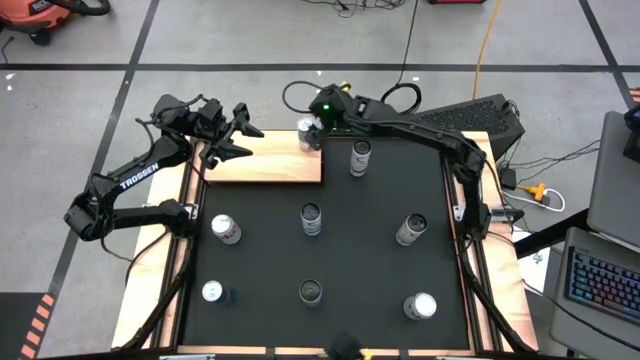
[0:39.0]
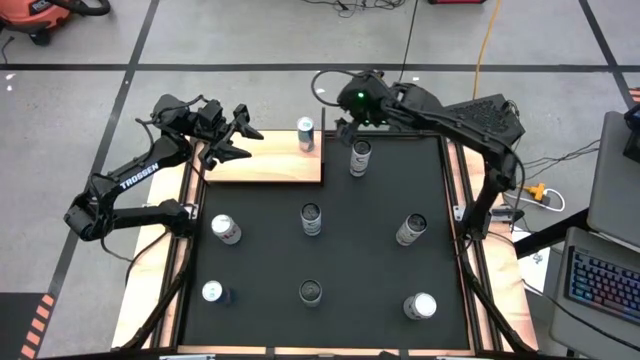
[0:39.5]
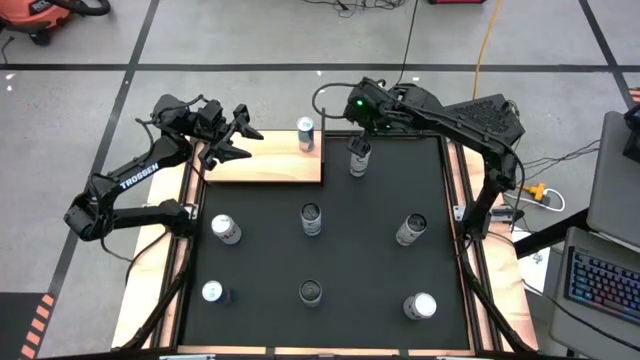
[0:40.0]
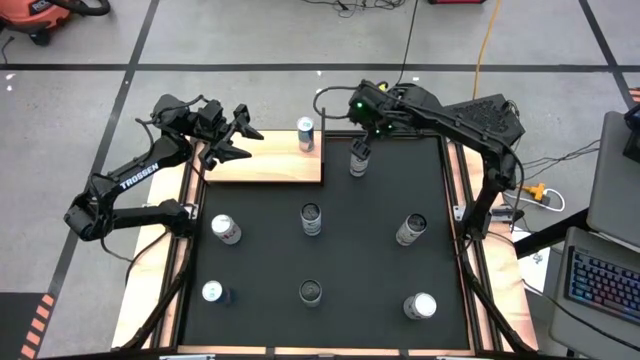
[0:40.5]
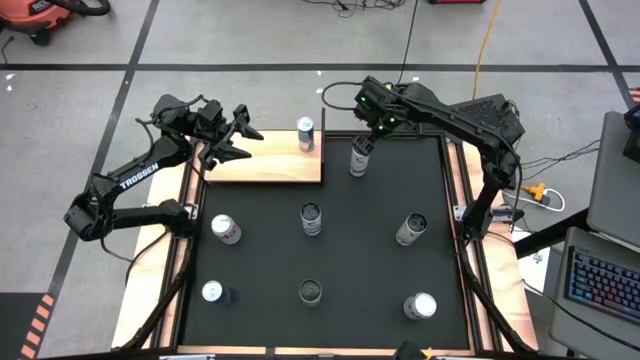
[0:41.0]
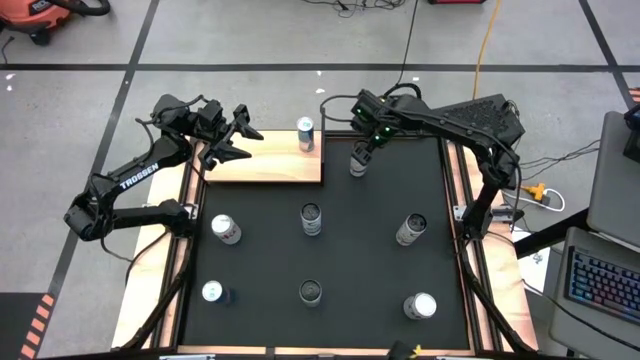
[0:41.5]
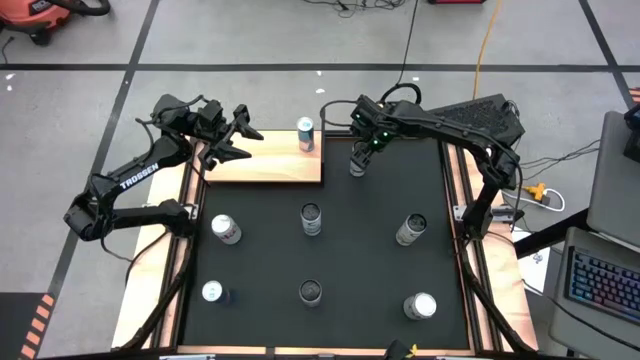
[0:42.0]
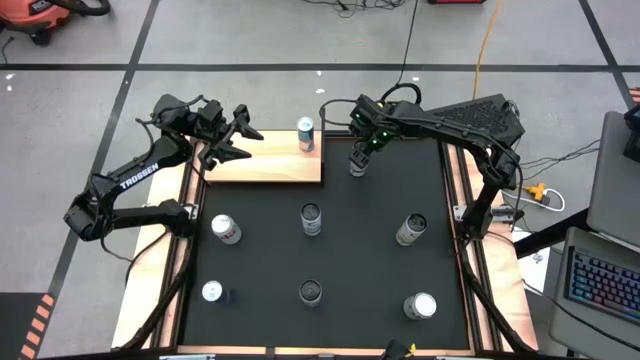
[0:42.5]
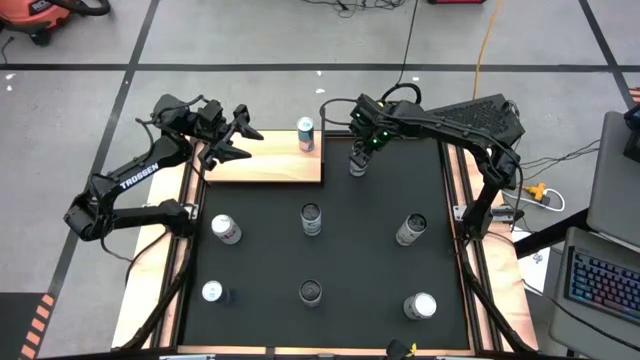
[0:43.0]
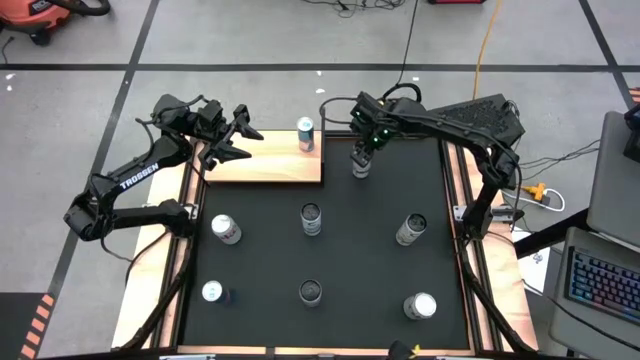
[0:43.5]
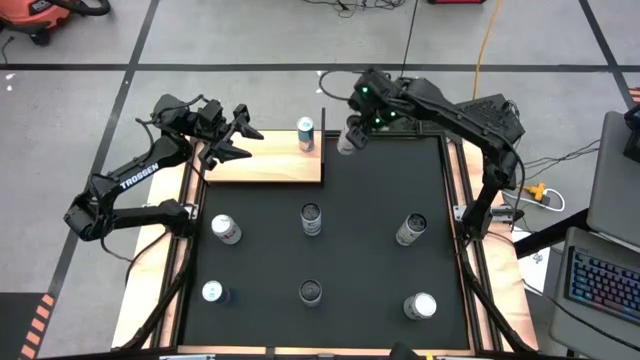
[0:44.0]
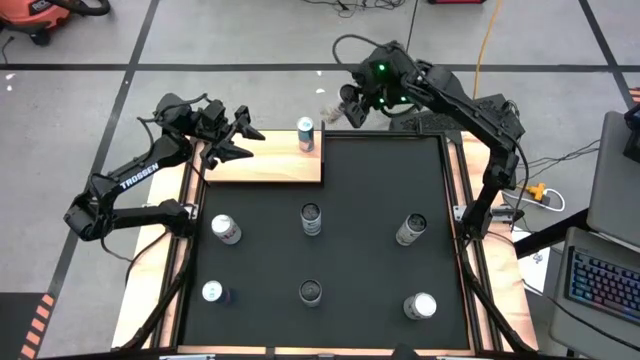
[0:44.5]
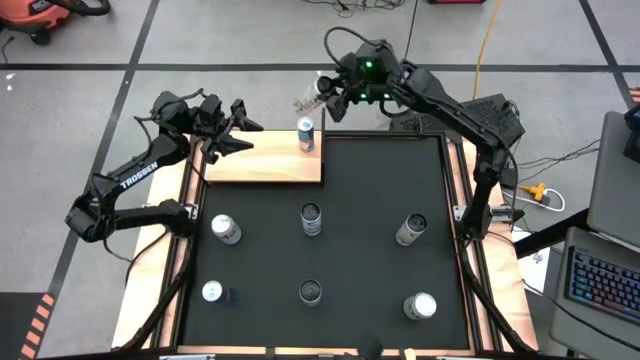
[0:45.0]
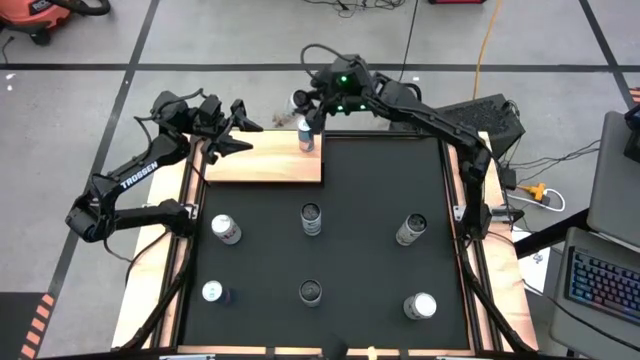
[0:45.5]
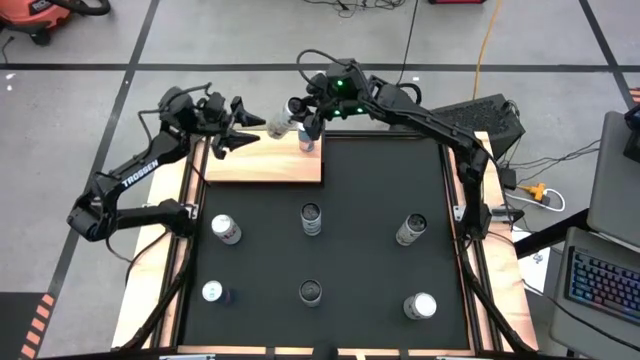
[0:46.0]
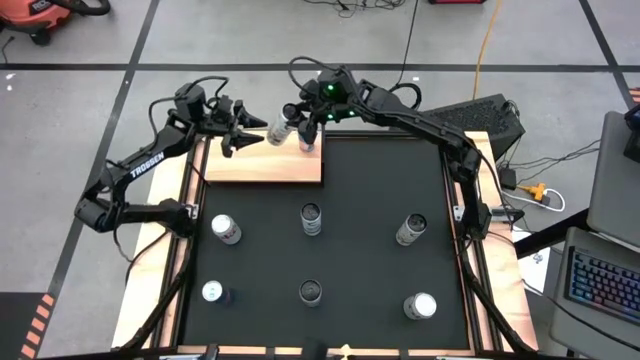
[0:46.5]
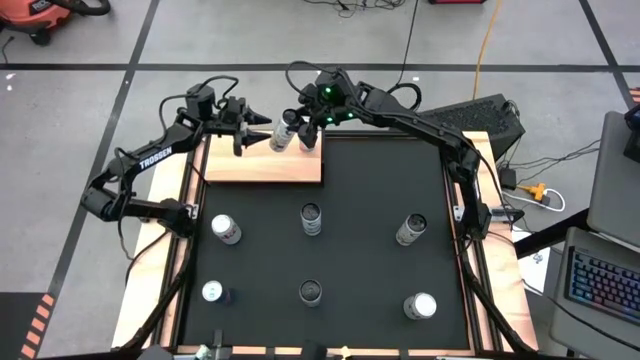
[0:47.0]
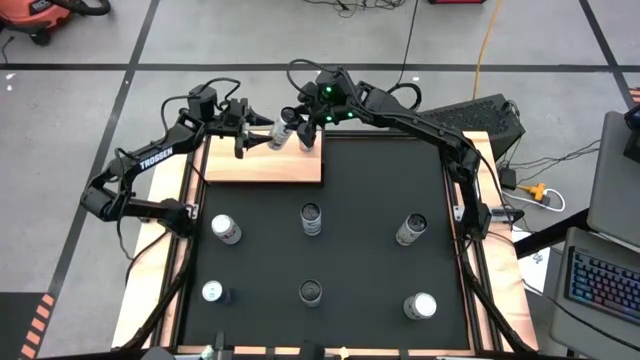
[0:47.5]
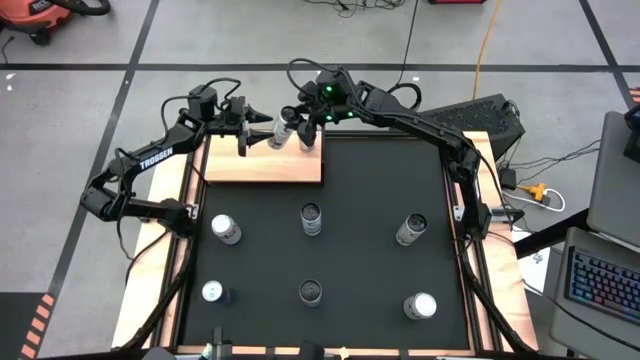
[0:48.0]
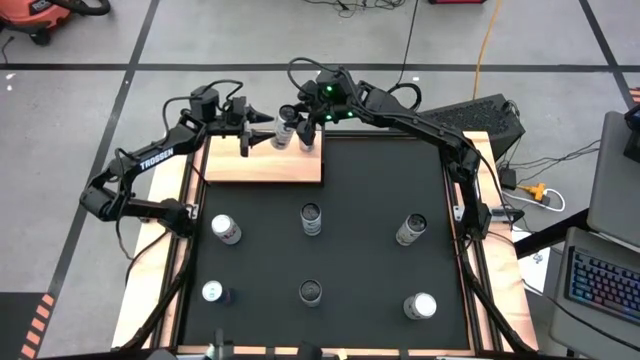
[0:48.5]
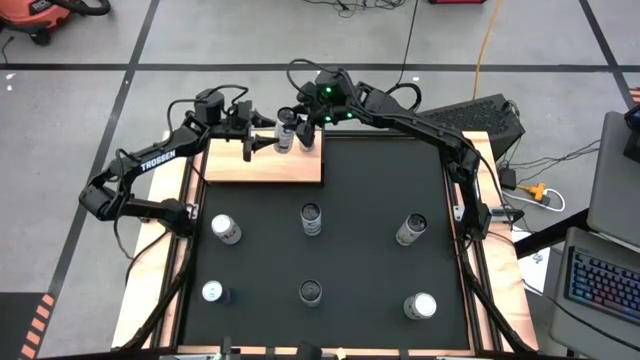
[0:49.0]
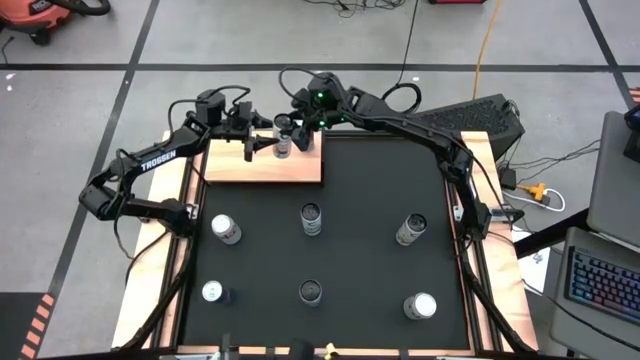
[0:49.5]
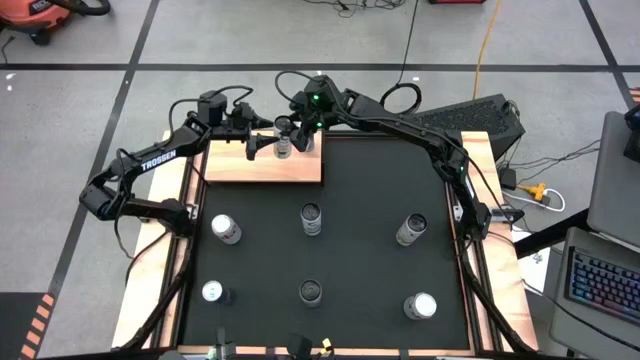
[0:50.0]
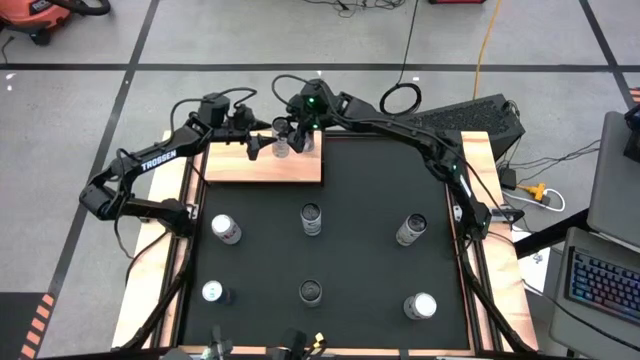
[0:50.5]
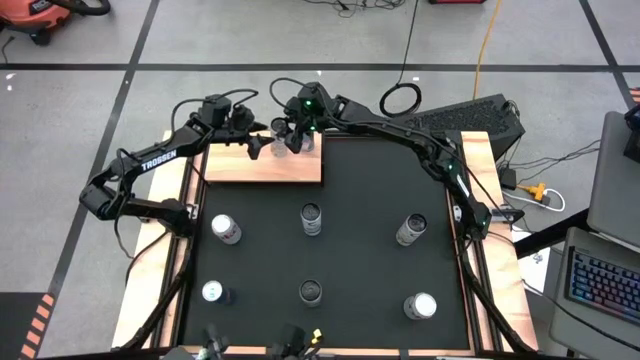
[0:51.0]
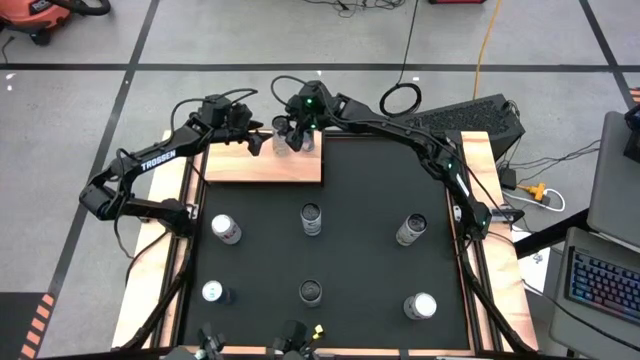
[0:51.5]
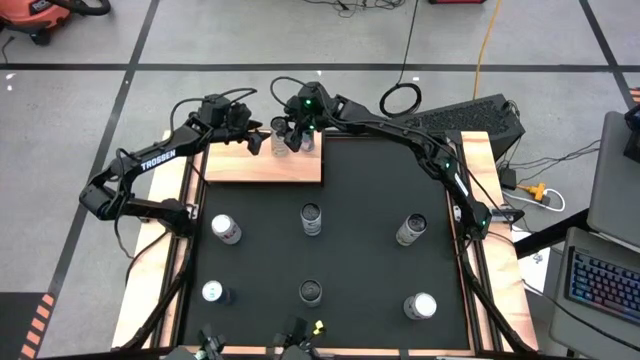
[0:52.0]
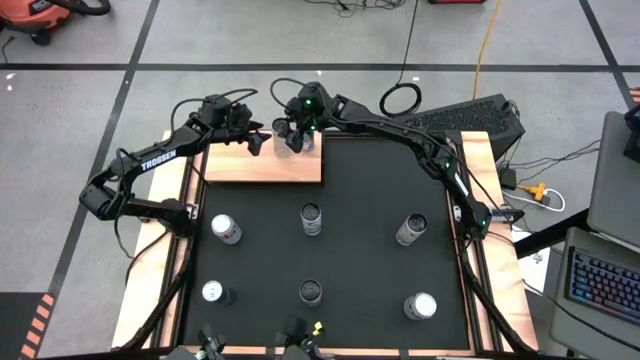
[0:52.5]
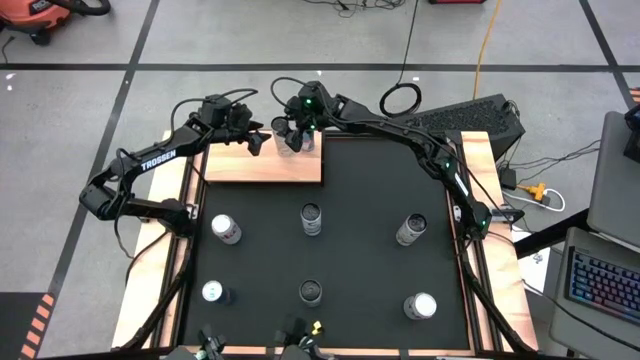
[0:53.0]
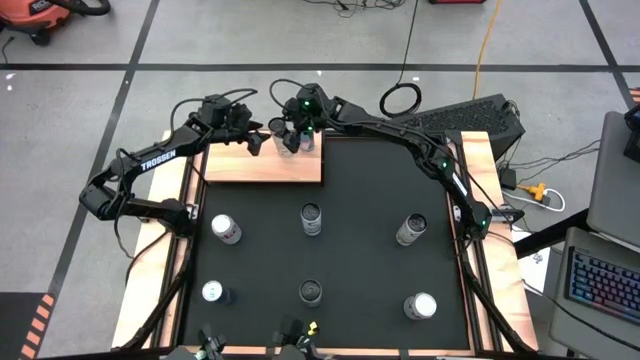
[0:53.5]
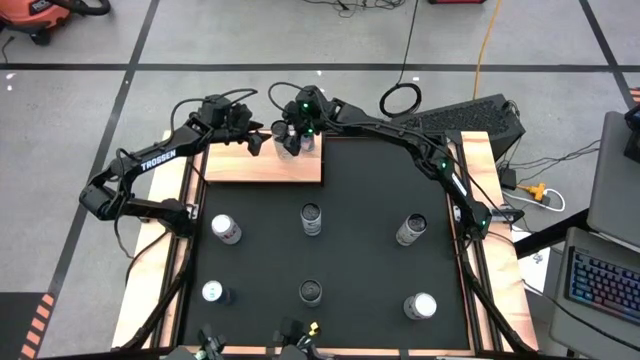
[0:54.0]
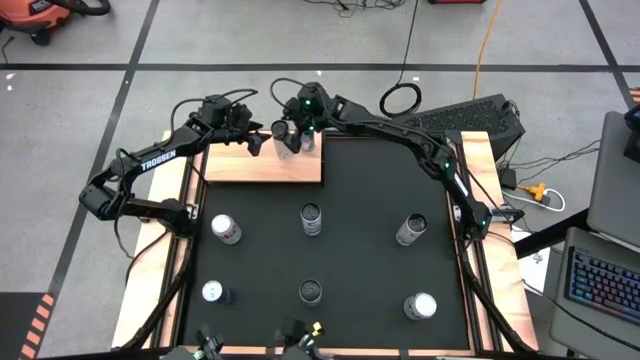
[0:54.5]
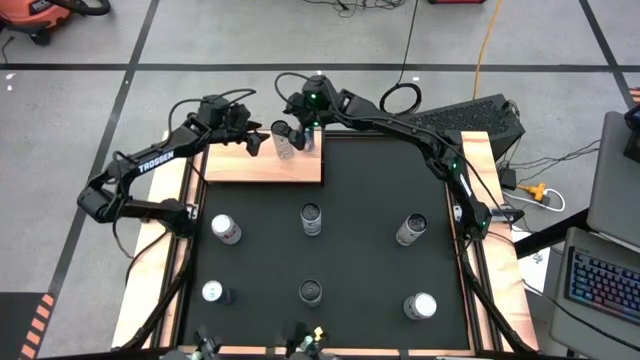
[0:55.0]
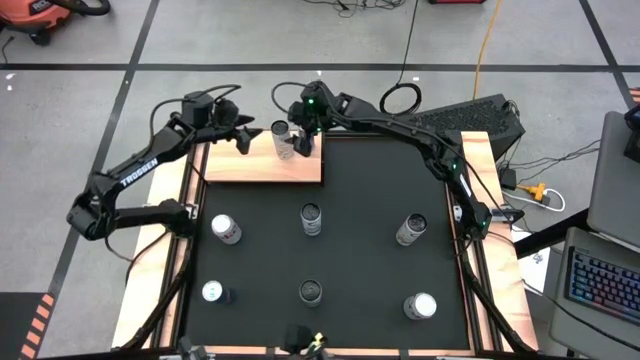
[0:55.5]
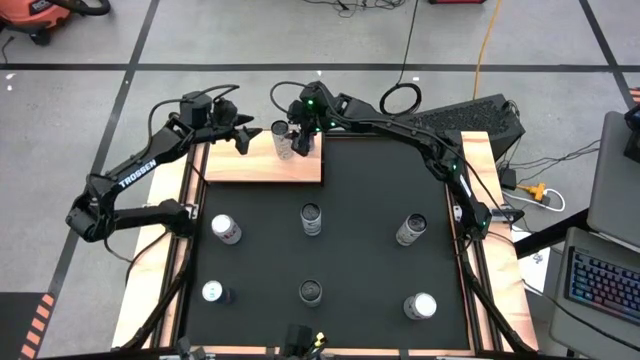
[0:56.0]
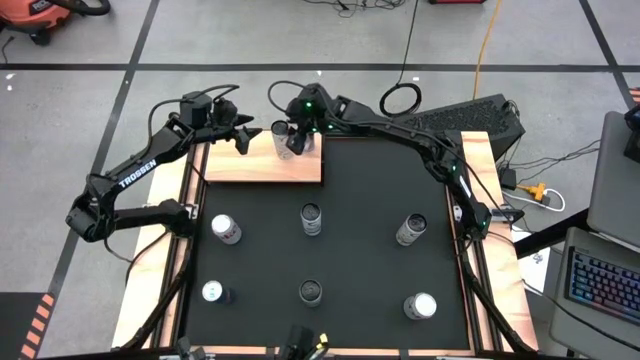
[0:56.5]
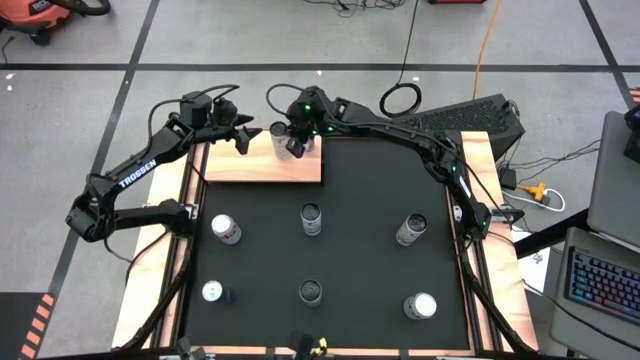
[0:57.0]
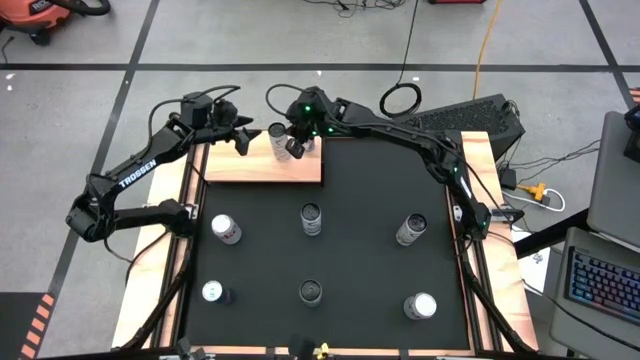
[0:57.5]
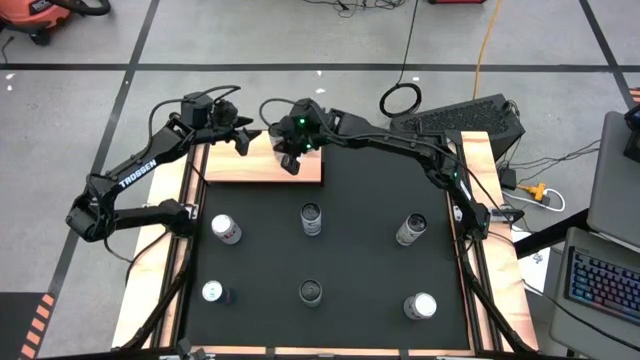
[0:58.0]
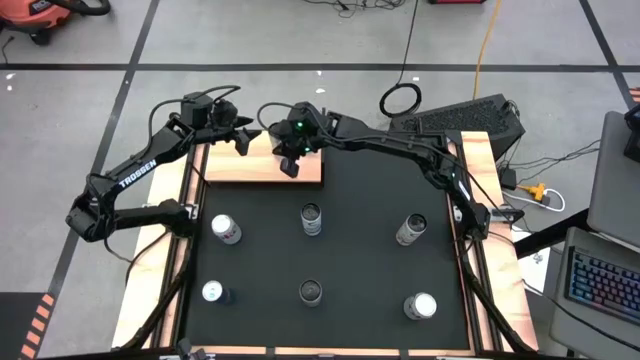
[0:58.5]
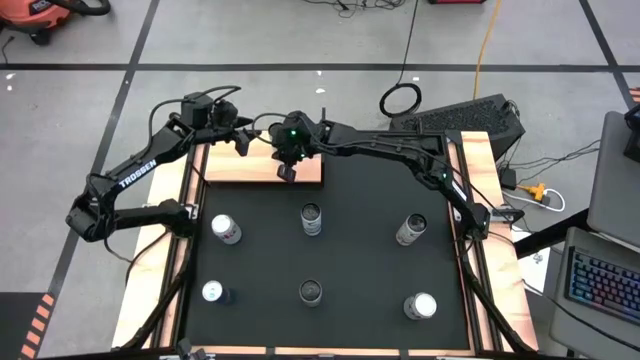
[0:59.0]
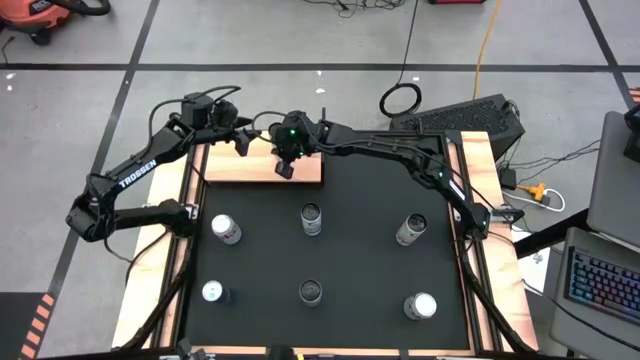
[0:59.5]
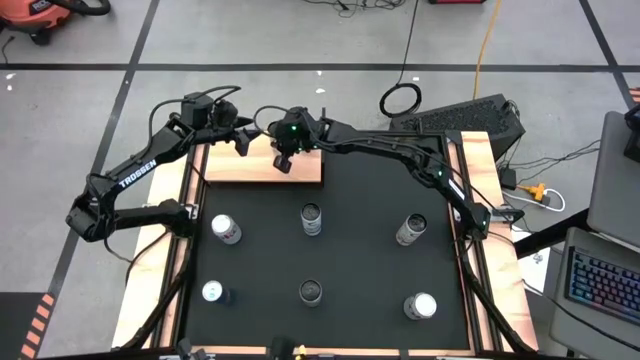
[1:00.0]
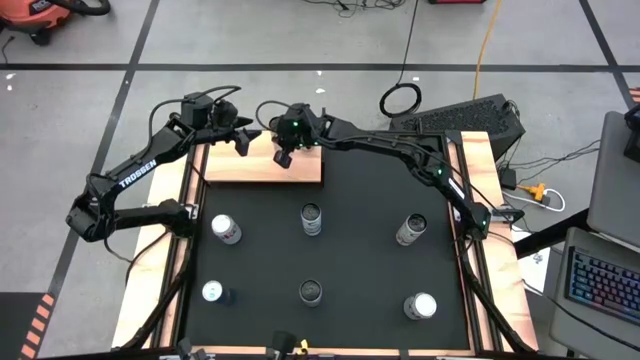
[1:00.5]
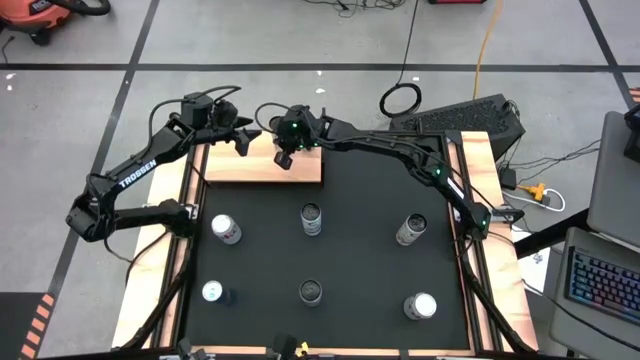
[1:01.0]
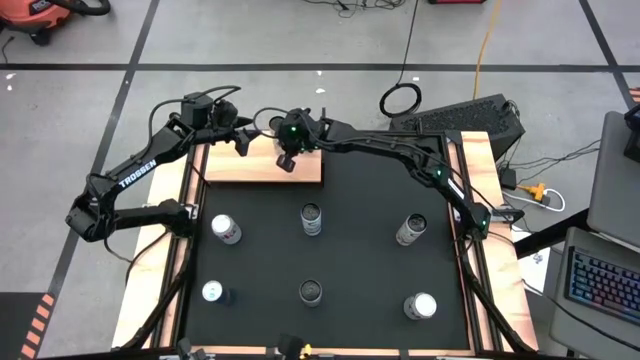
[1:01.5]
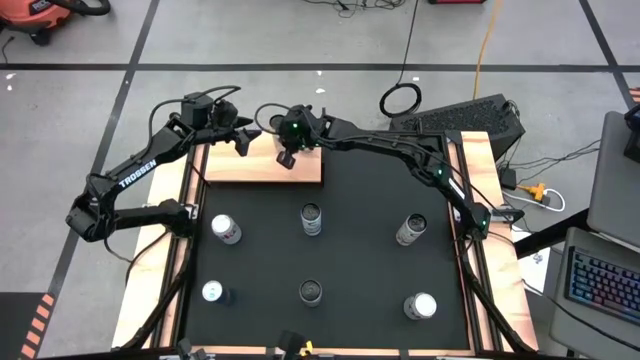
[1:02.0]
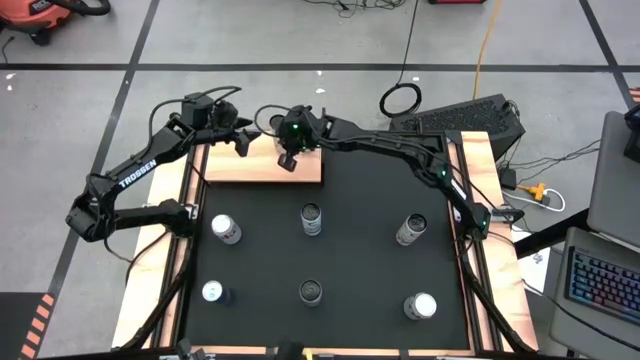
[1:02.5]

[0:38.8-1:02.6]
Task: Place canned beverage on shelf
Put the top white yellow soda can on the shelf
